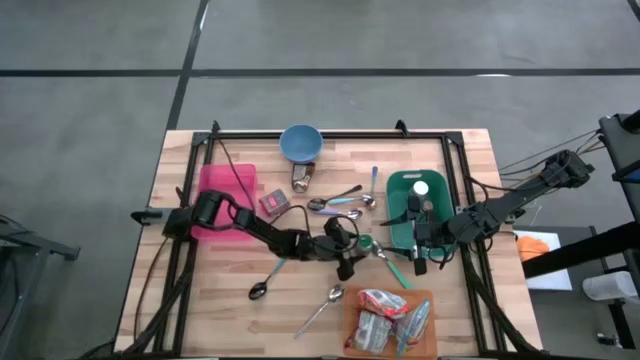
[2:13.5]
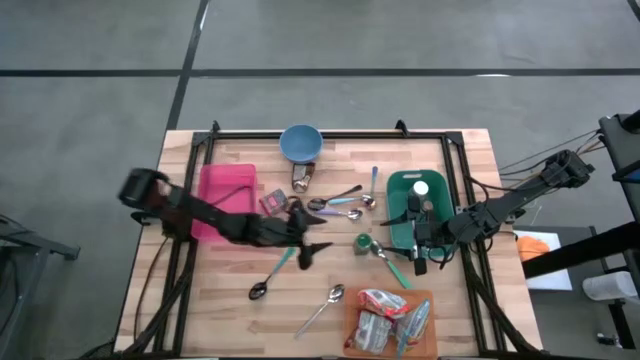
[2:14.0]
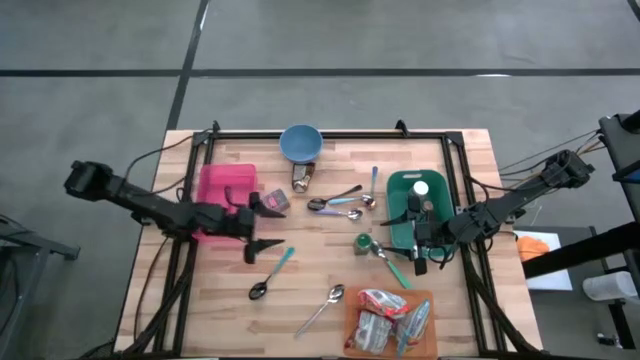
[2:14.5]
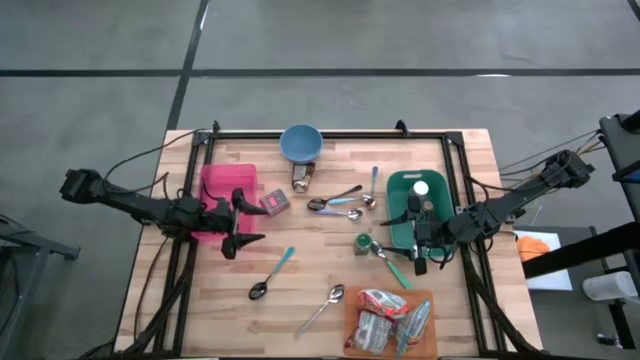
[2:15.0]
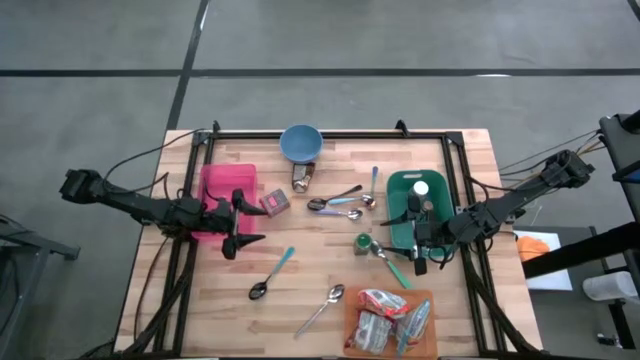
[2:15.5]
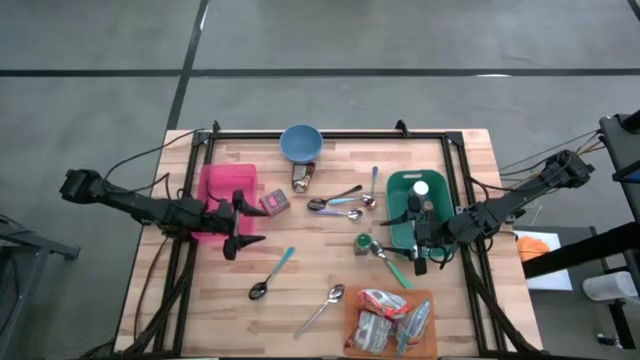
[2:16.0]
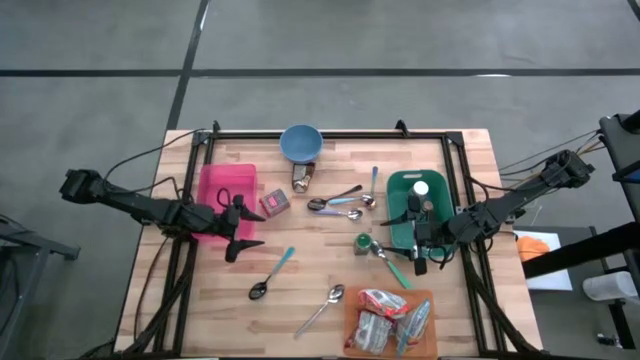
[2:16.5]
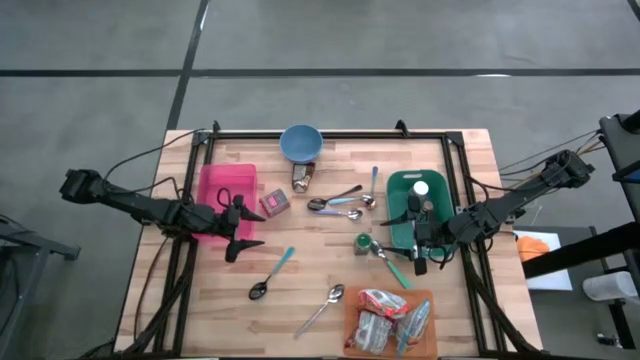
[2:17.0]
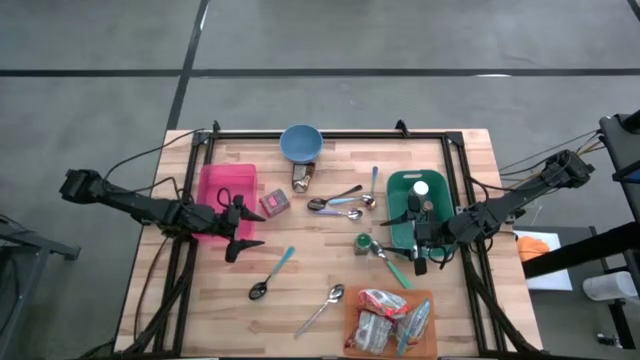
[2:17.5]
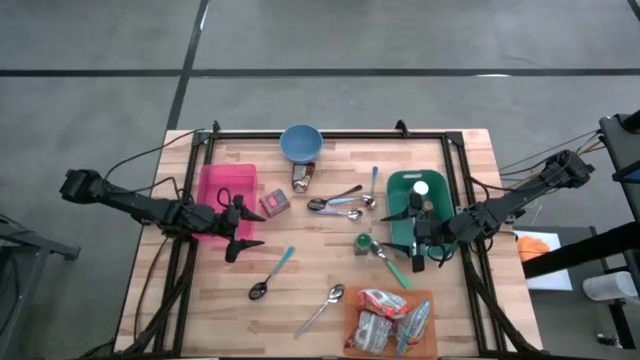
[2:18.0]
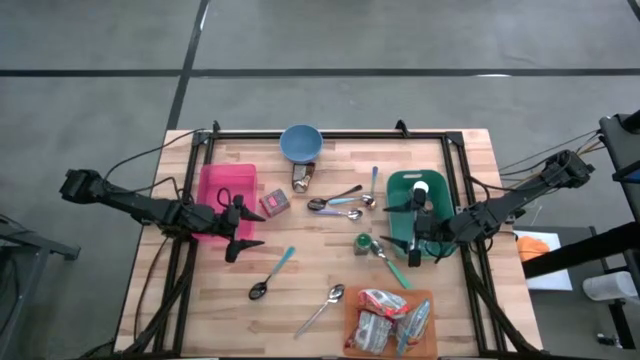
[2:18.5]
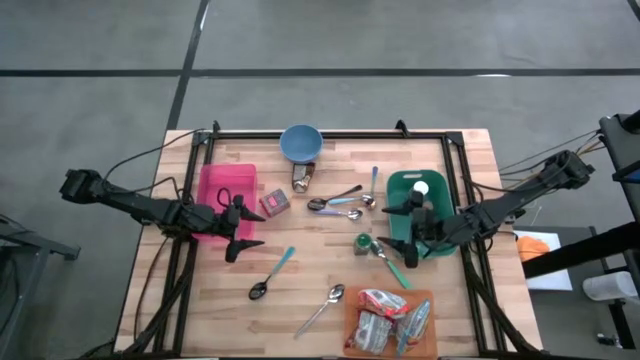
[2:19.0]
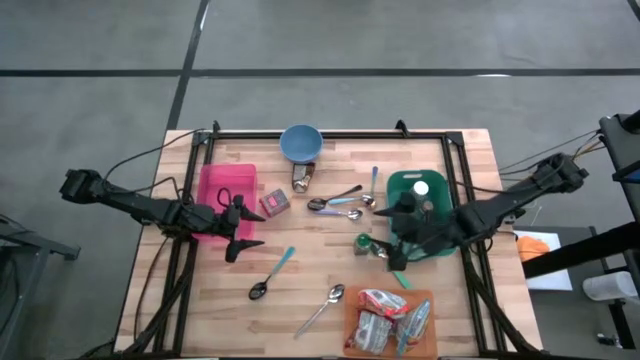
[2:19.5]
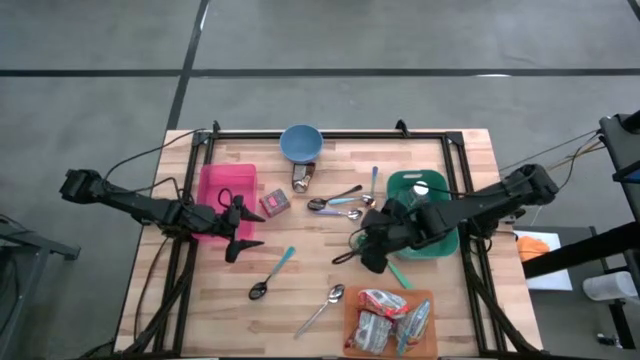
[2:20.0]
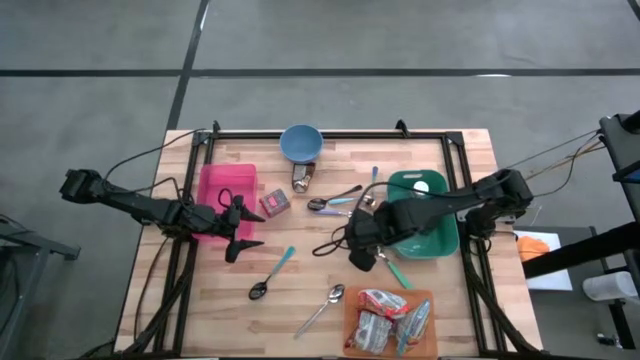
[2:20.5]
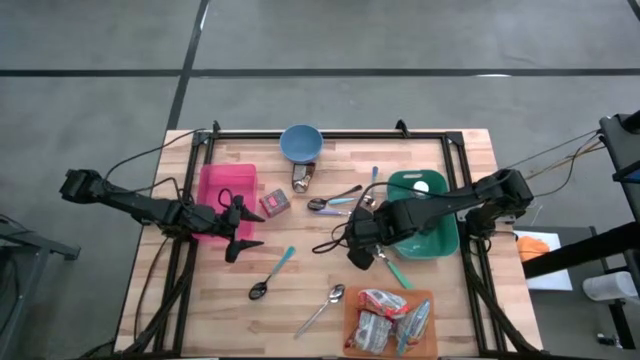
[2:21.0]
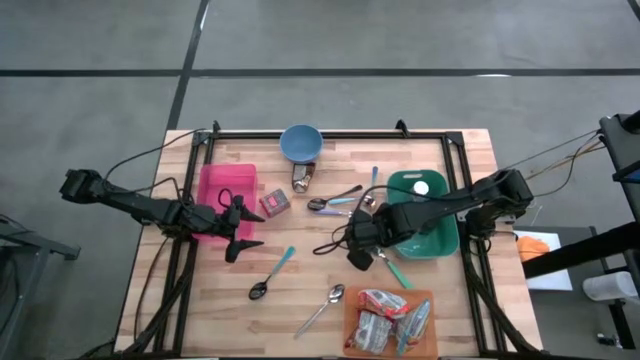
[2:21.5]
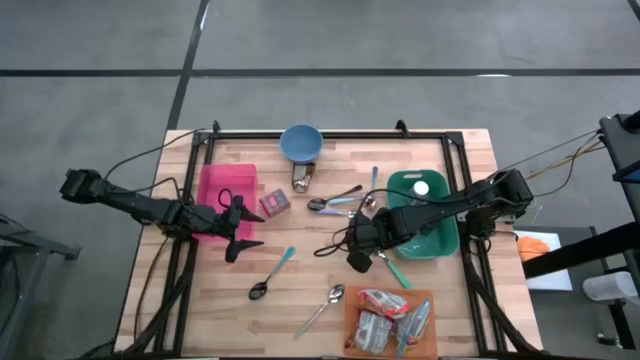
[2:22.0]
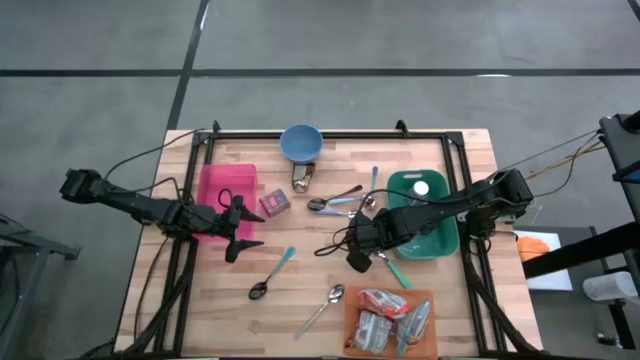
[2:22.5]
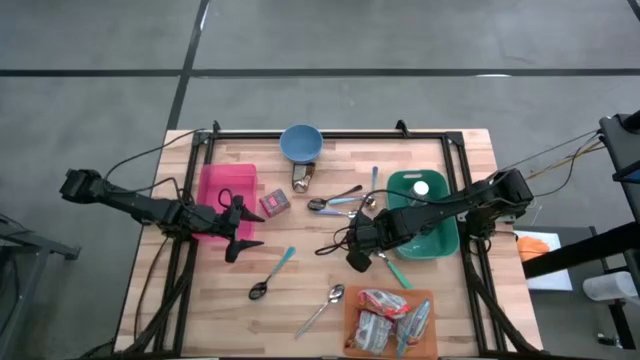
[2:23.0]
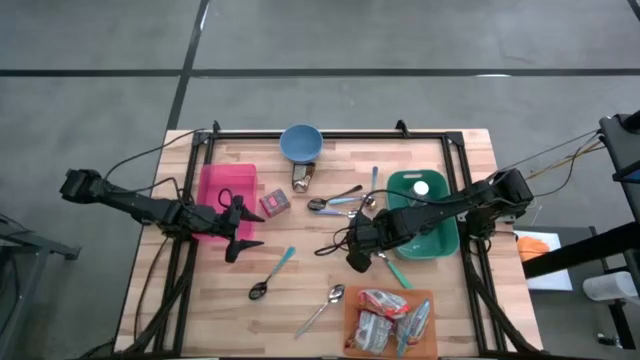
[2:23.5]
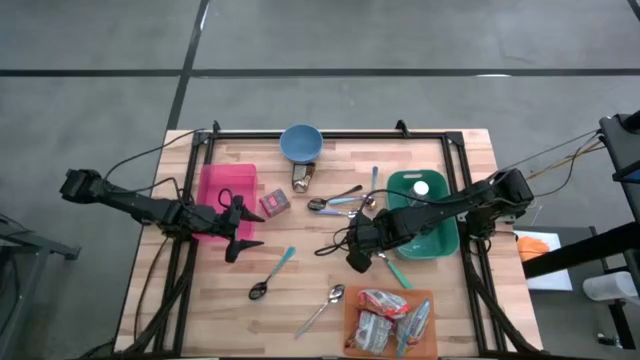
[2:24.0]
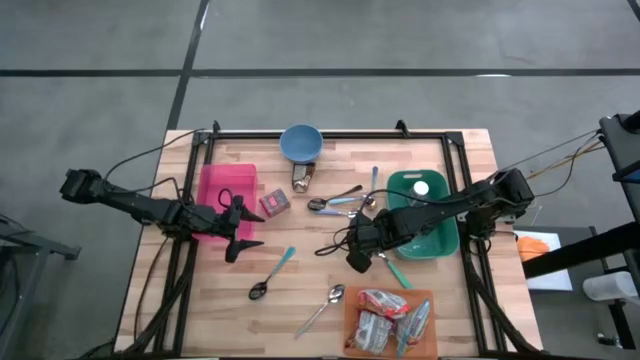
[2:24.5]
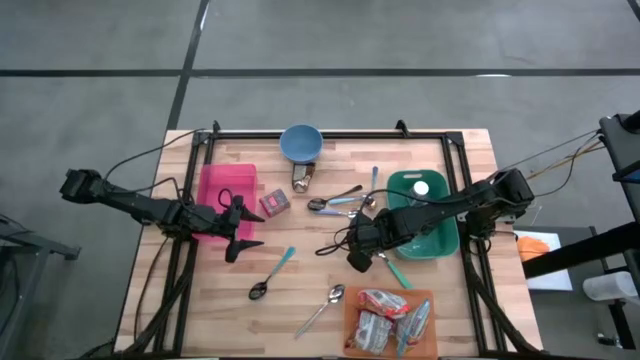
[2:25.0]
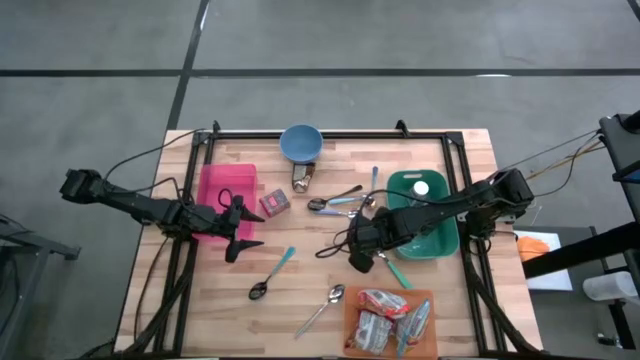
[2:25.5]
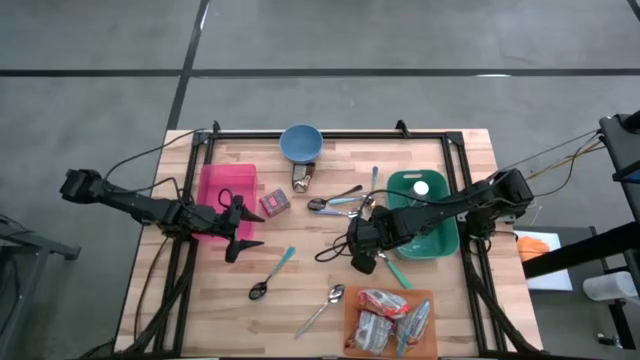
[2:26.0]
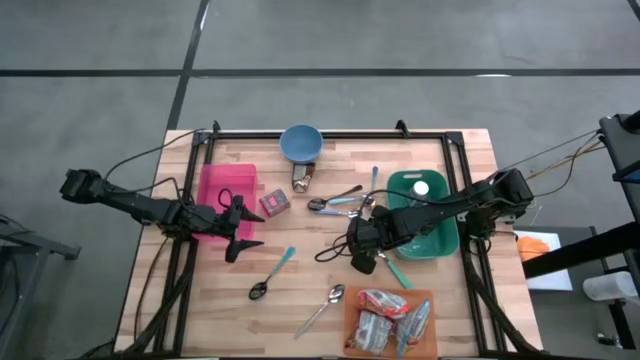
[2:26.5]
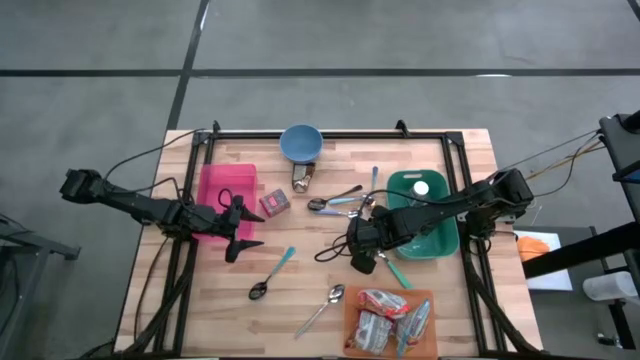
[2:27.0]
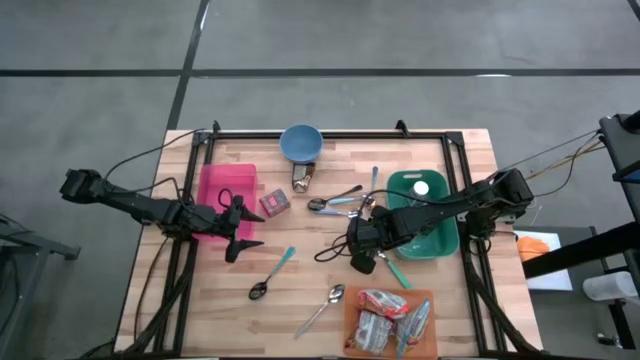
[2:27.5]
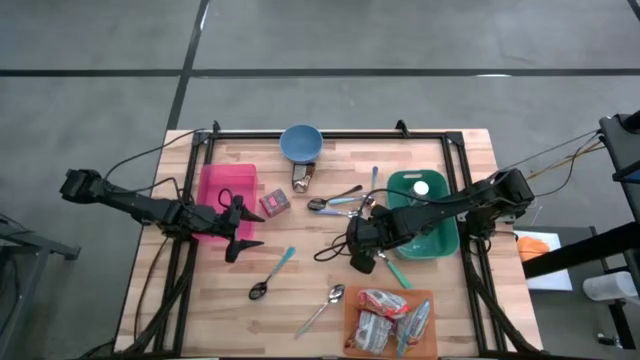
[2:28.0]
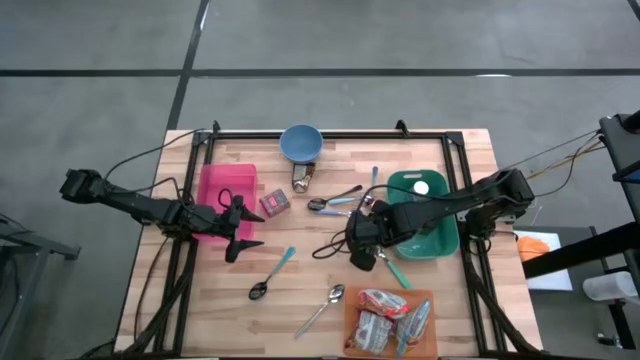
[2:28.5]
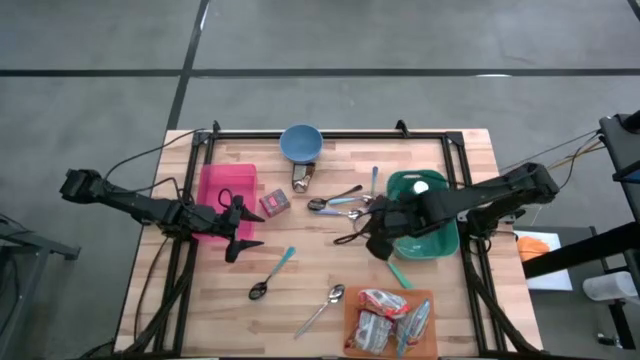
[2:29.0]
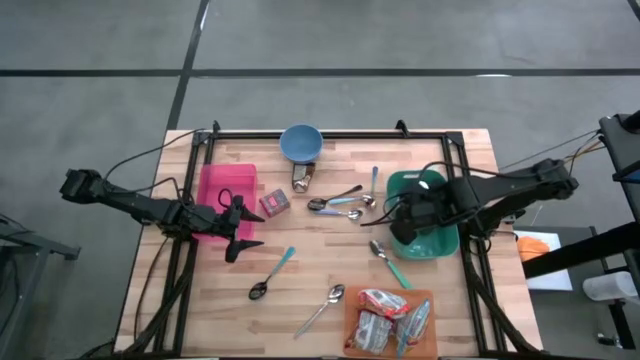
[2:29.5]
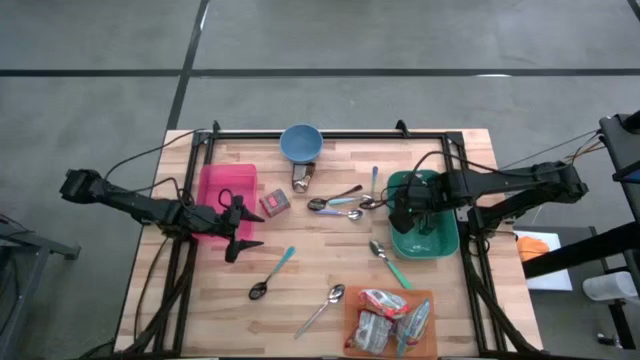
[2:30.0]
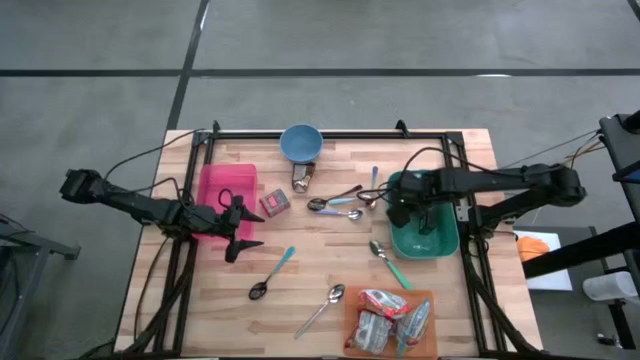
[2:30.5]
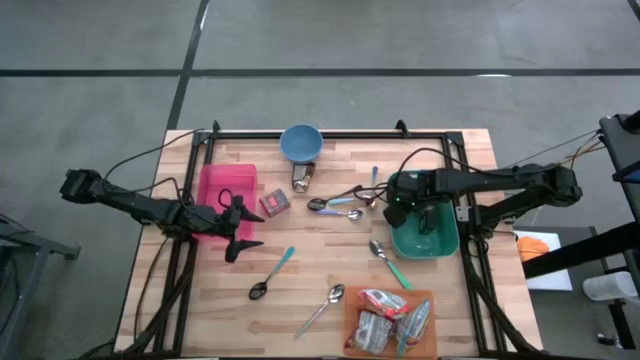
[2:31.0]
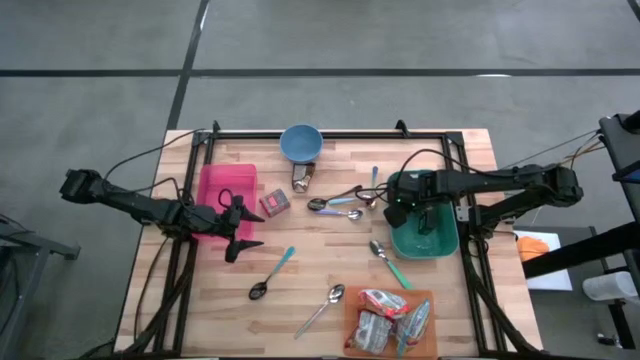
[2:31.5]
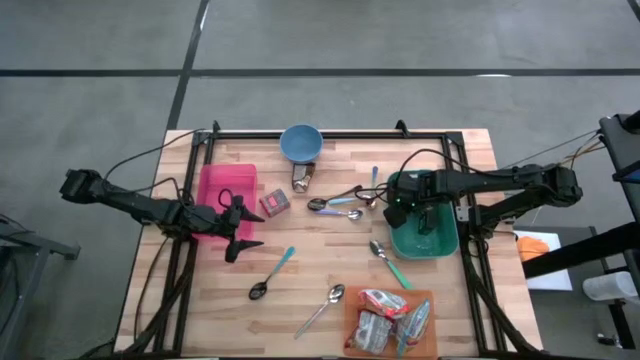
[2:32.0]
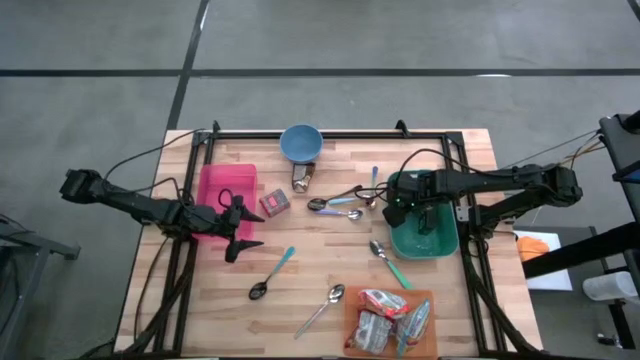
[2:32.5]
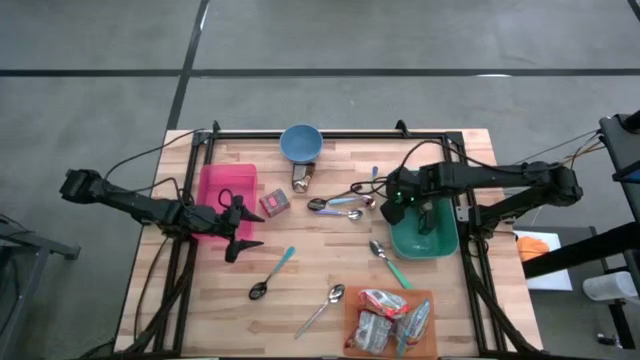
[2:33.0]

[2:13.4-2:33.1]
Put the green seasoning bottle into the green bin
